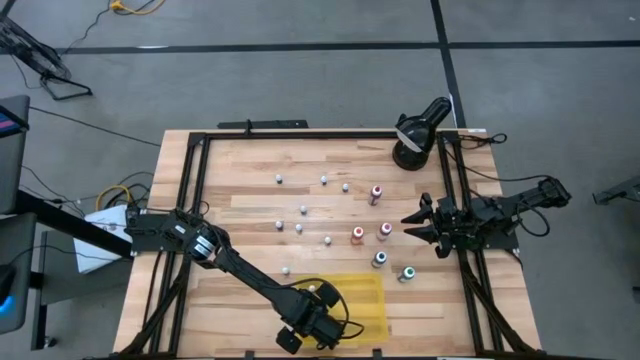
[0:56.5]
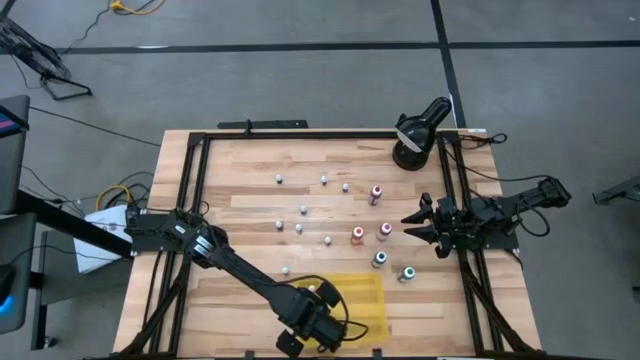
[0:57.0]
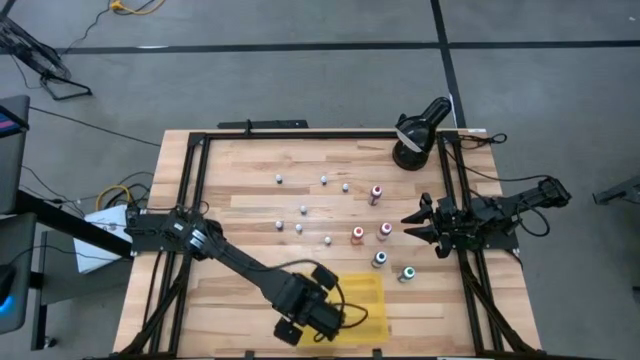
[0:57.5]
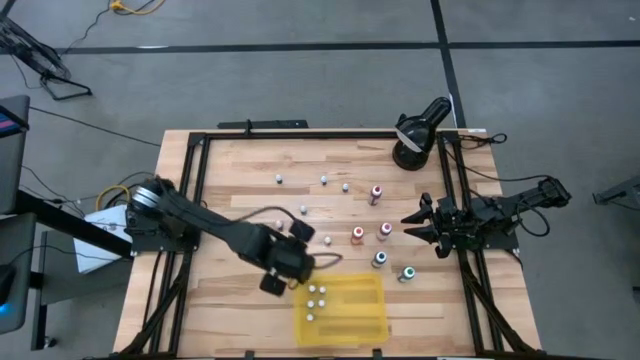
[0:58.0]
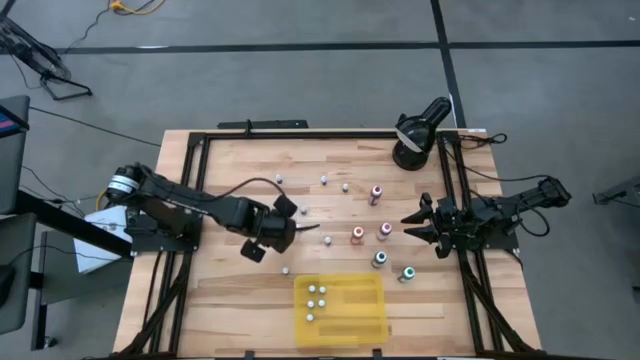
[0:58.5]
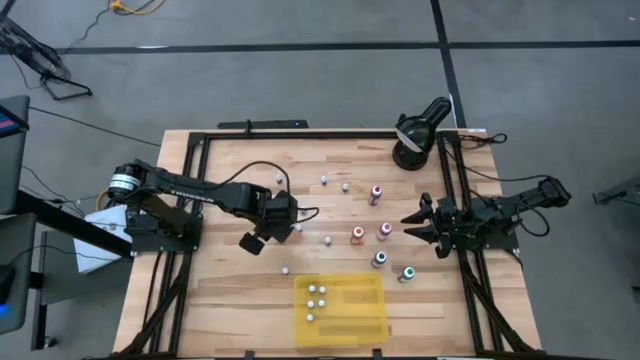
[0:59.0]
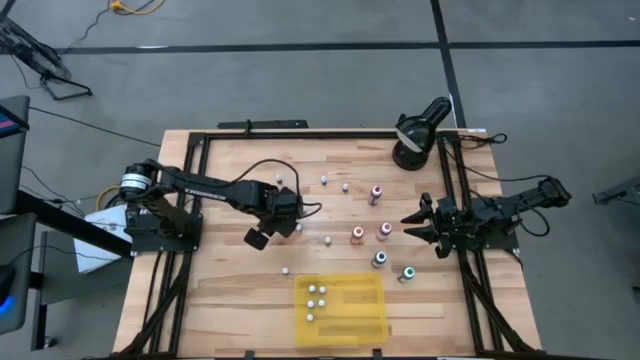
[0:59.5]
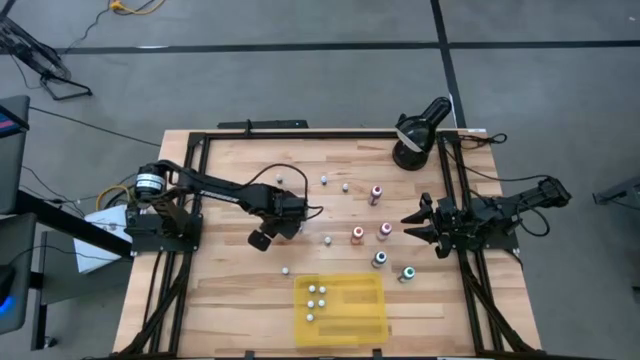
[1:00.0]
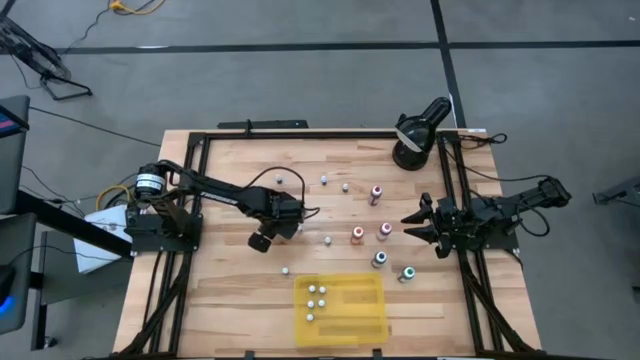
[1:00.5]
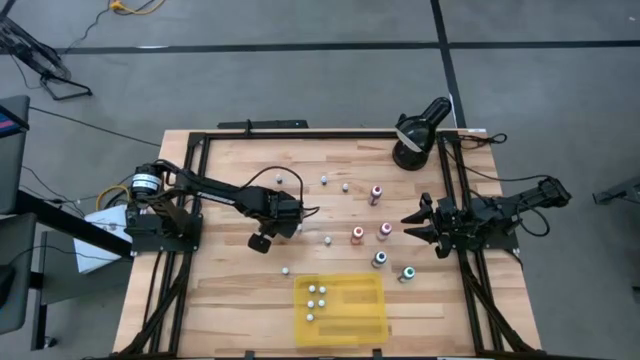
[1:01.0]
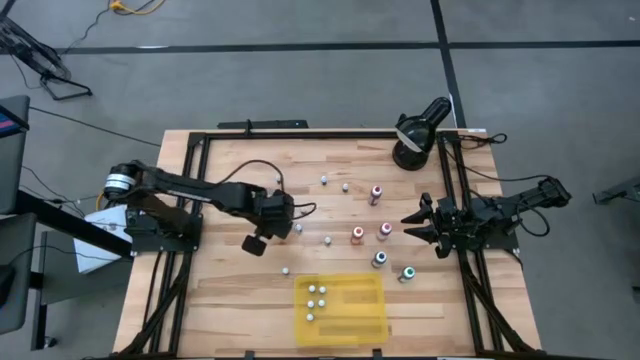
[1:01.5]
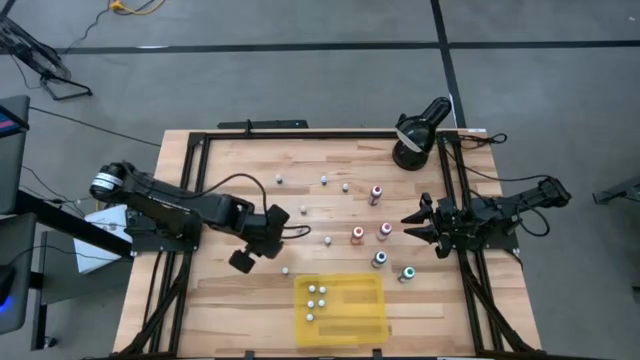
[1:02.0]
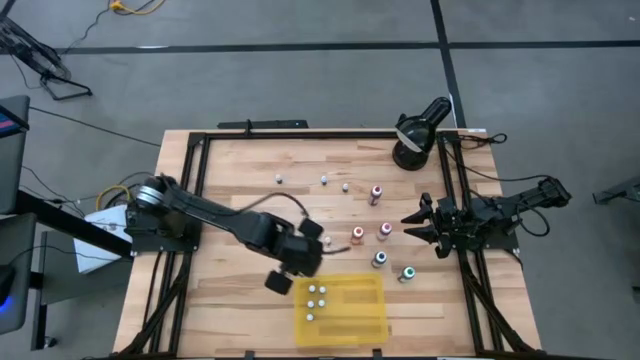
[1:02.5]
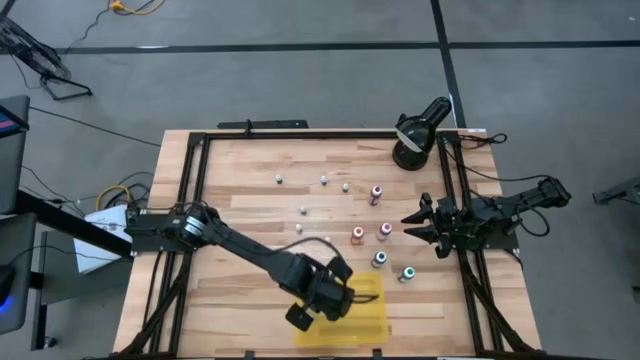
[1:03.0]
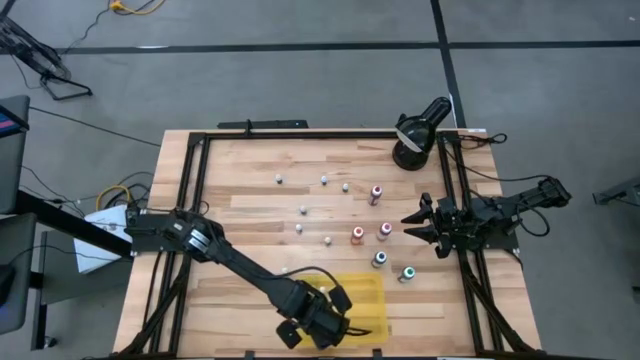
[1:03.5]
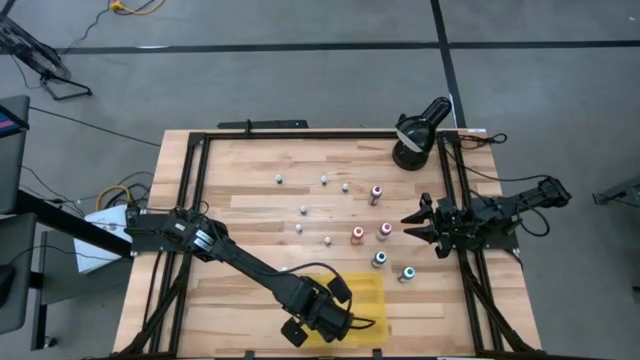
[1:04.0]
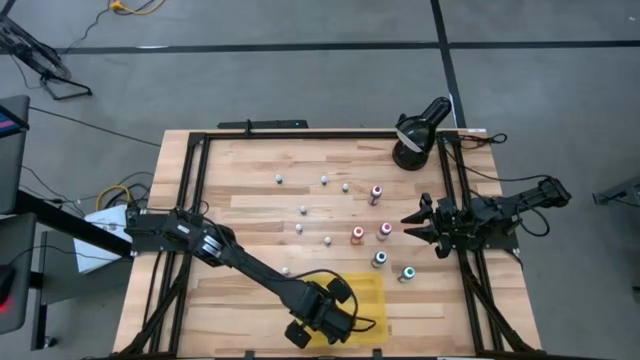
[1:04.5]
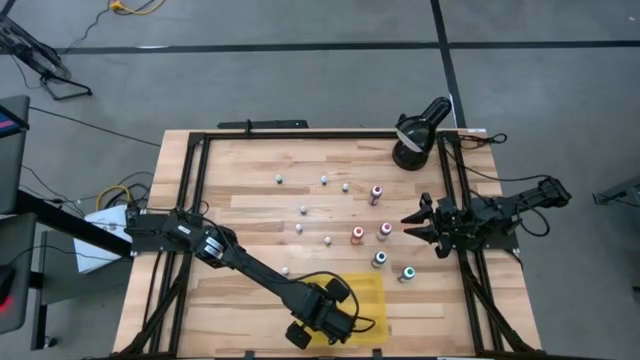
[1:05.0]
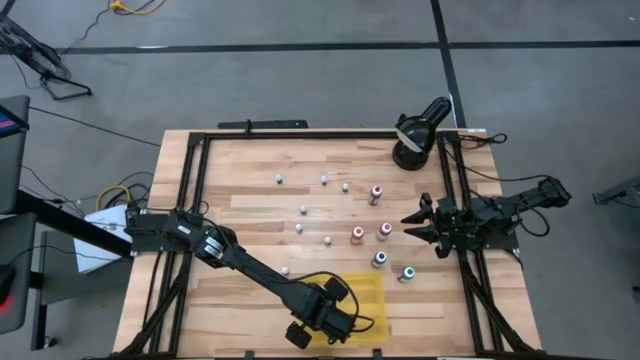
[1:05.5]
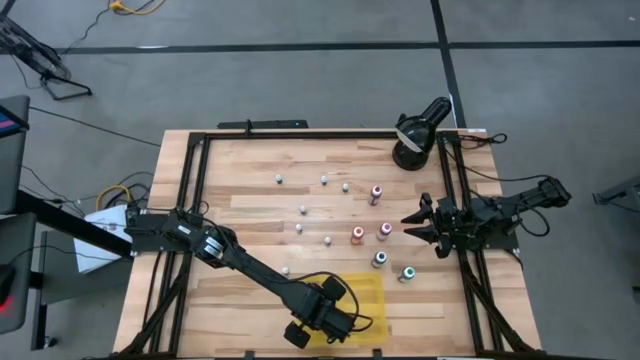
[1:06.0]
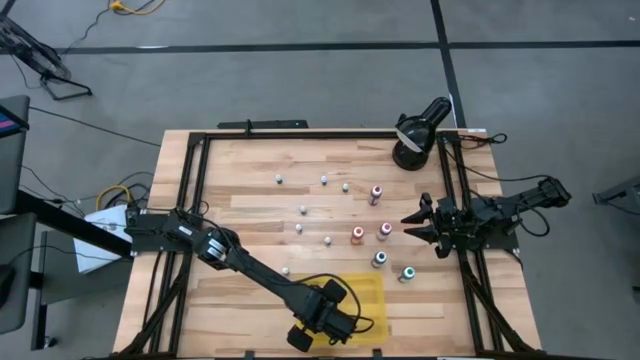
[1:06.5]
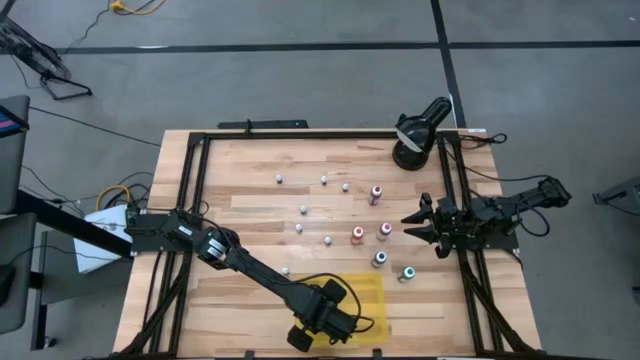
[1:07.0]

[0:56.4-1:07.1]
Task: Pick & Place food coloring
Put the small red food coloring bottle in the yellow bin

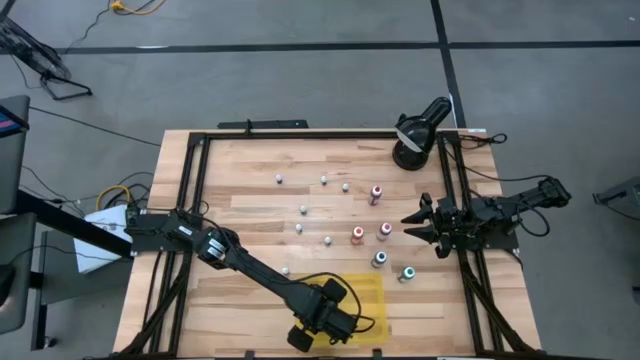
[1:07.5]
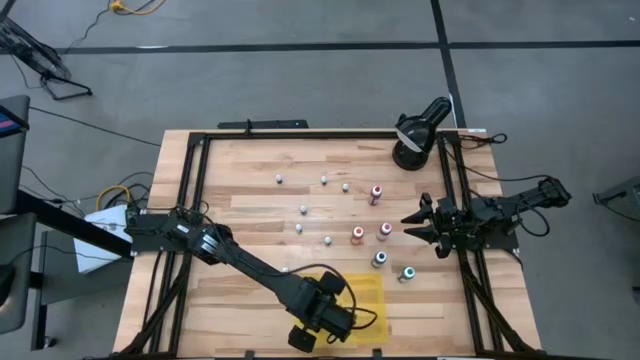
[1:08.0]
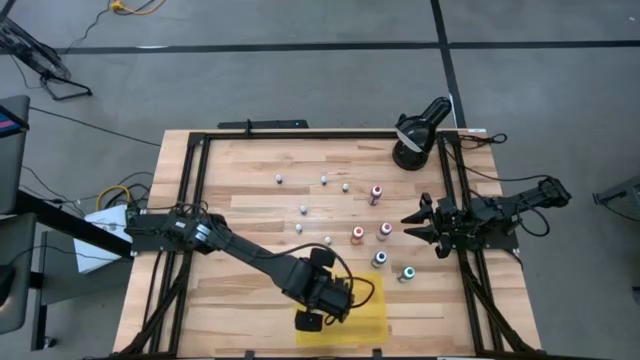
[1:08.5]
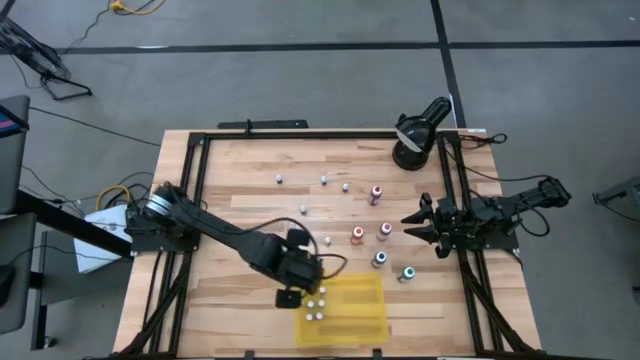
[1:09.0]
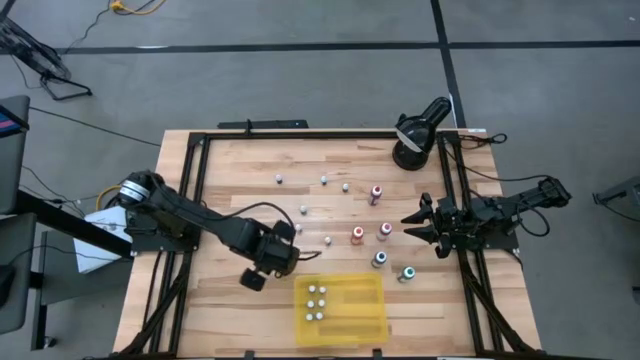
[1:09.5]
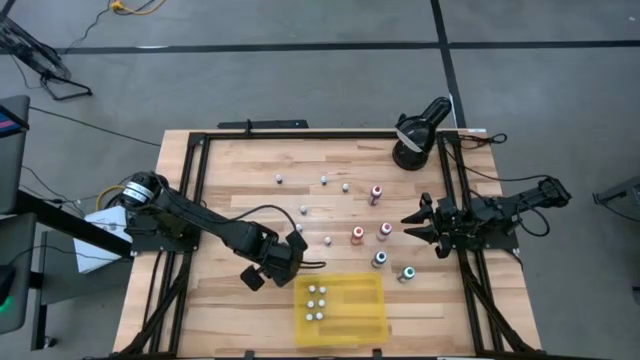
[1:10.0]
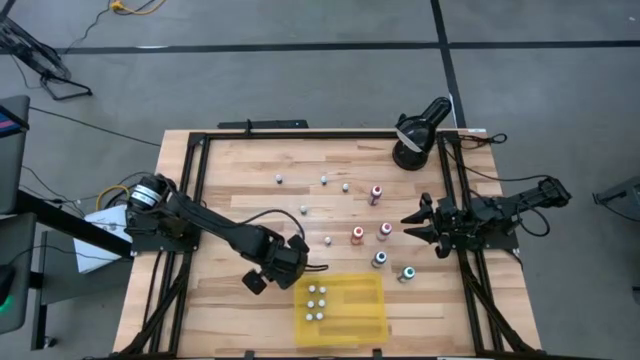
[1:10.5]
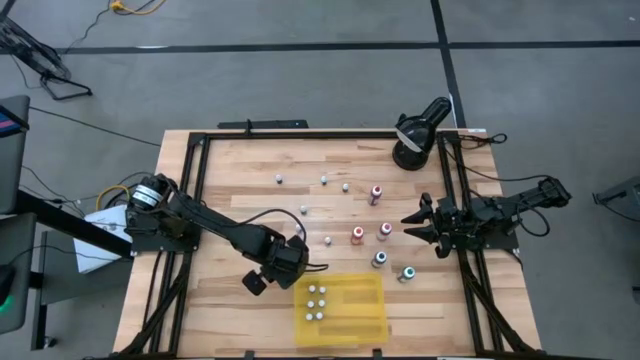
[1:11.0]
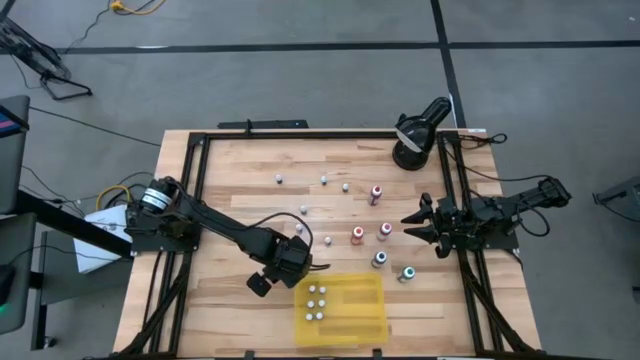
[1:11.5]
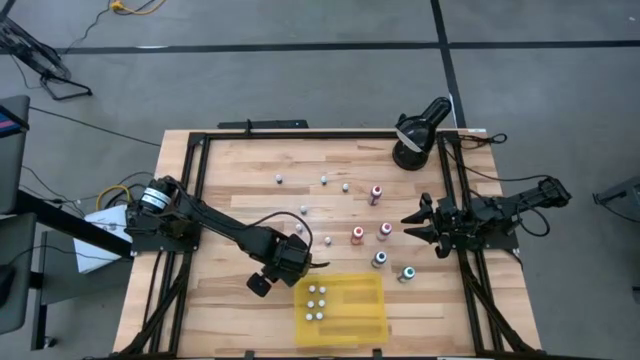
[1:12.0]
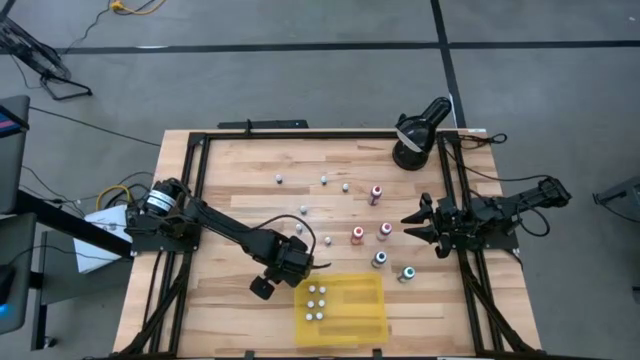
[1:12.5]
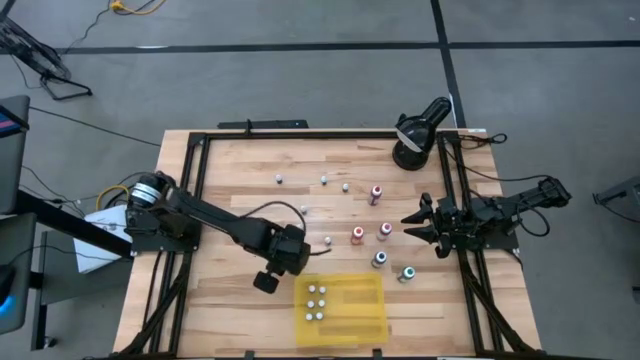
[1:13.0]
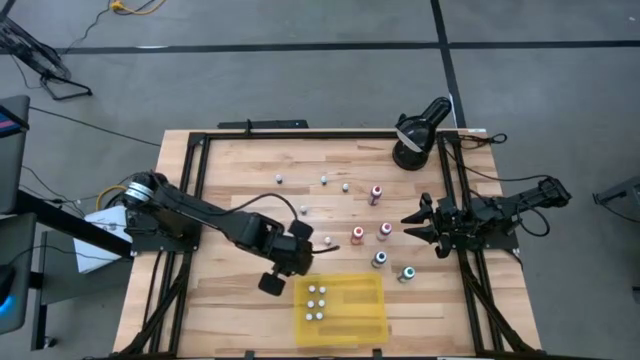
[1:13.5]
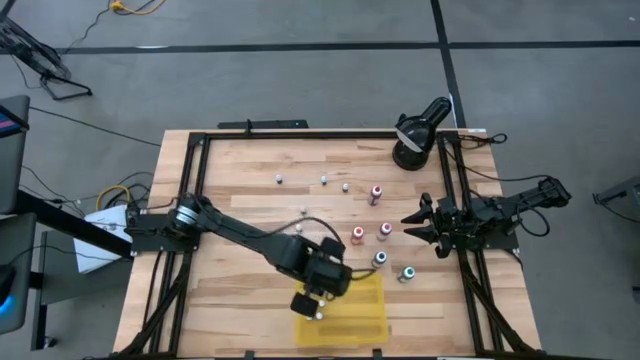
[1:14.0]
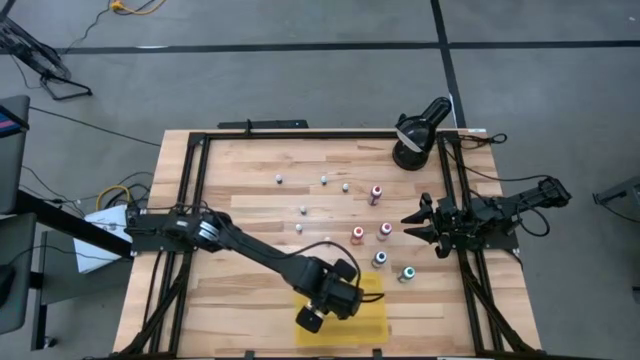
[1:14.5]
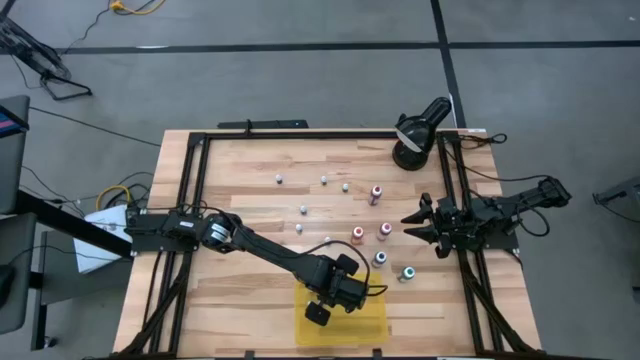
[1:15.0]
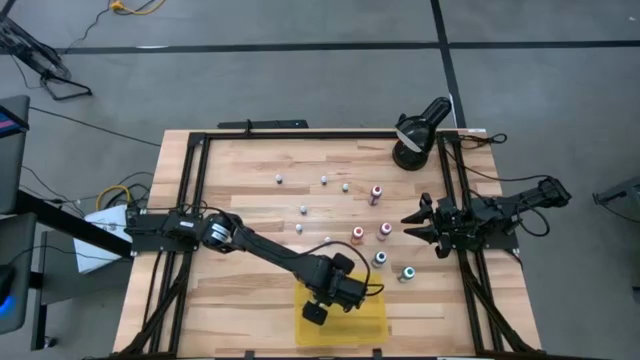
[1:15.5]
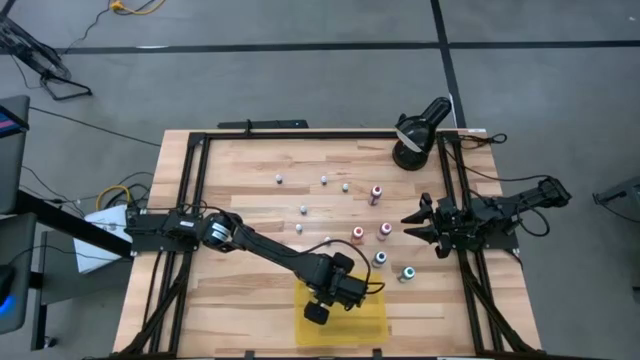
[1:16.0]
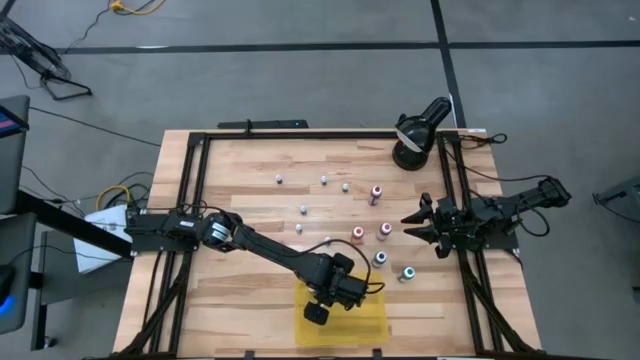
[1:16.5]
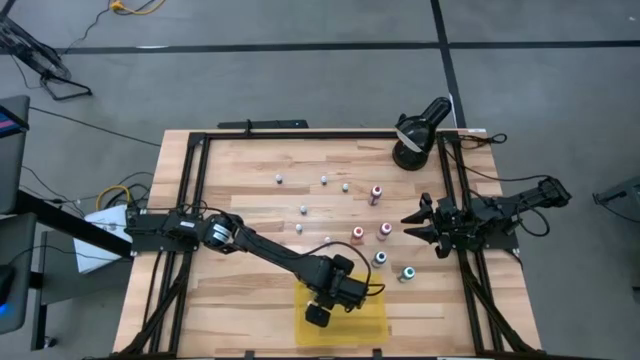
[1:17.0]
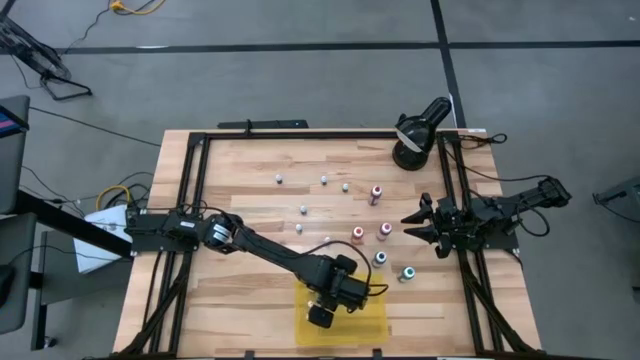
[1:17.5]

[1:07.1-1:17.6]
Put the small green food coloring bottle in the yellow bin
